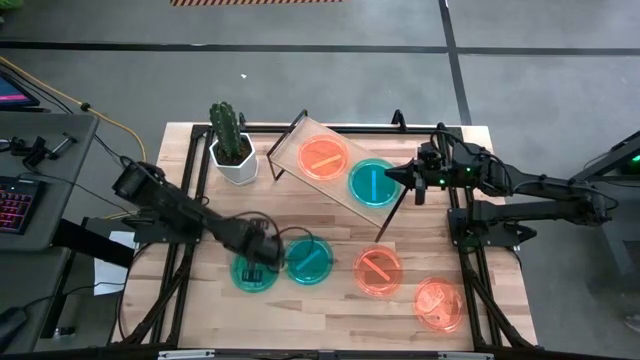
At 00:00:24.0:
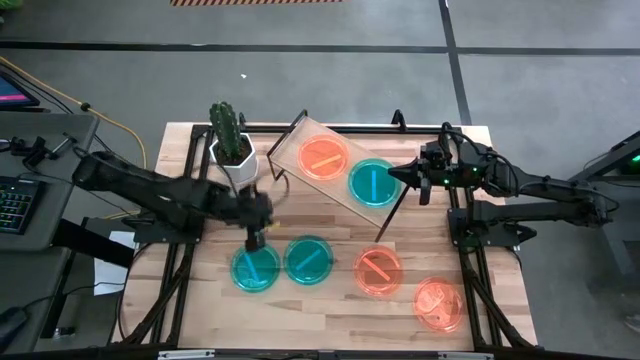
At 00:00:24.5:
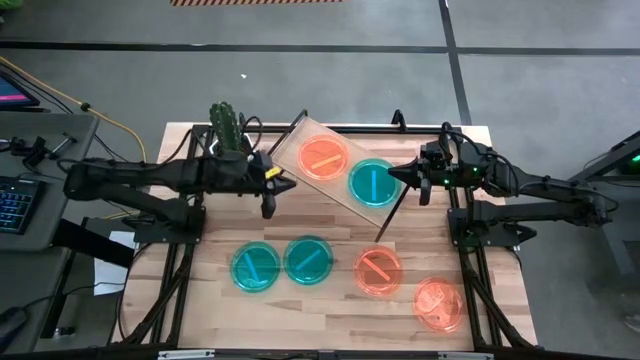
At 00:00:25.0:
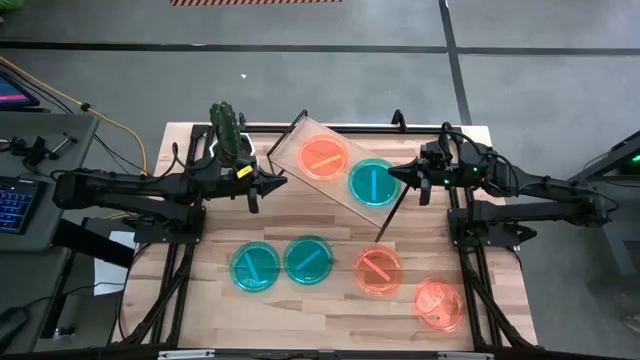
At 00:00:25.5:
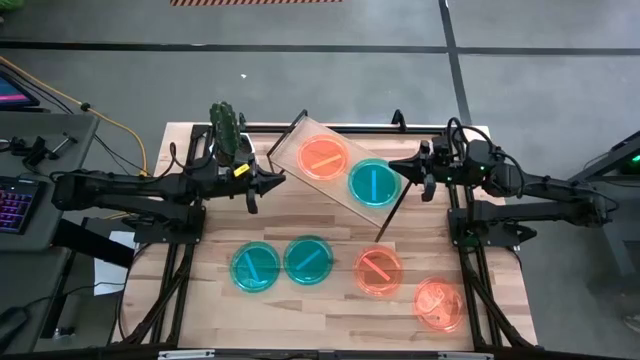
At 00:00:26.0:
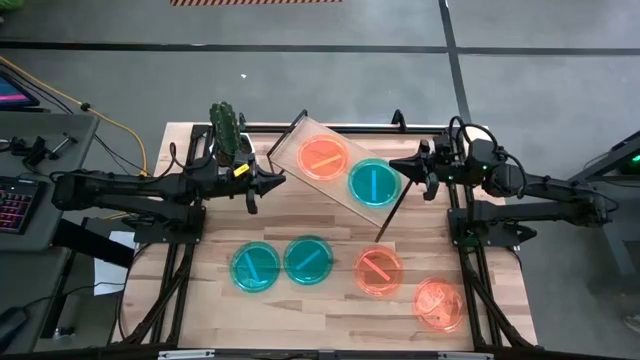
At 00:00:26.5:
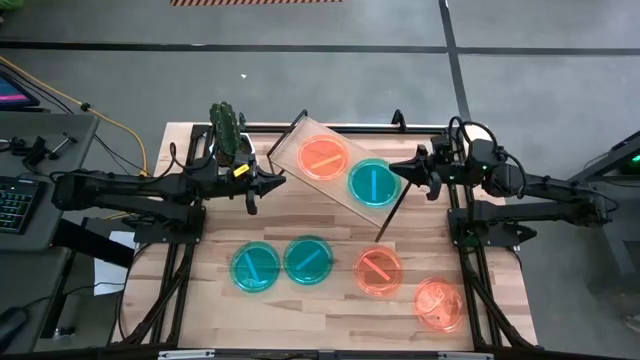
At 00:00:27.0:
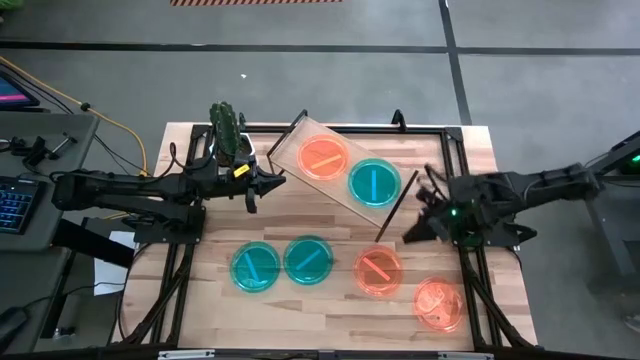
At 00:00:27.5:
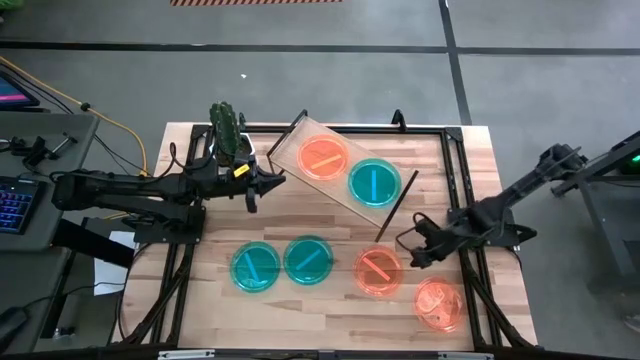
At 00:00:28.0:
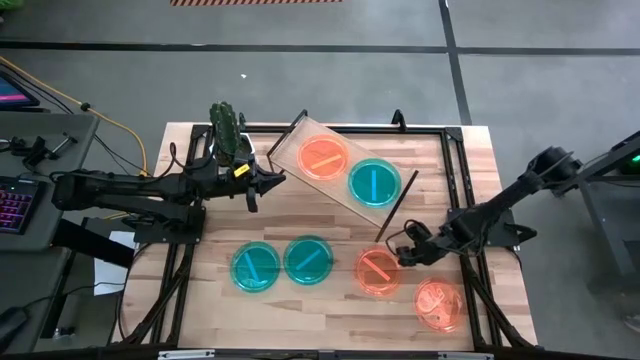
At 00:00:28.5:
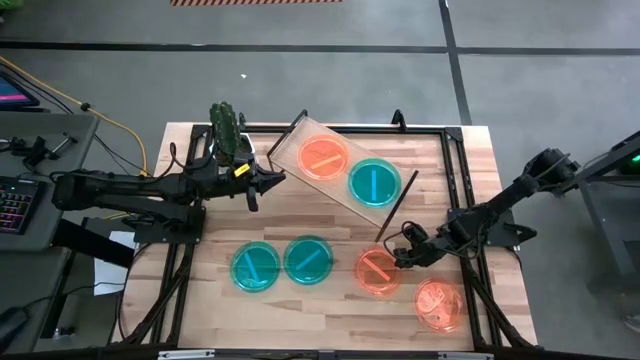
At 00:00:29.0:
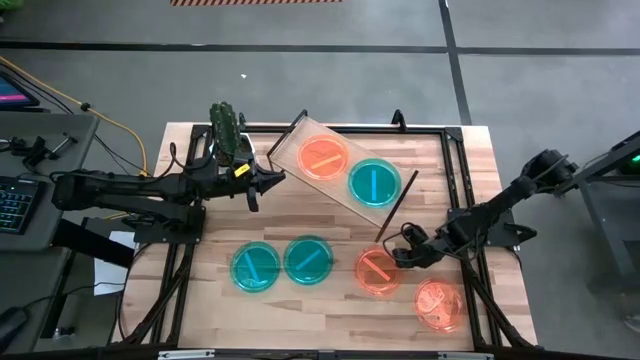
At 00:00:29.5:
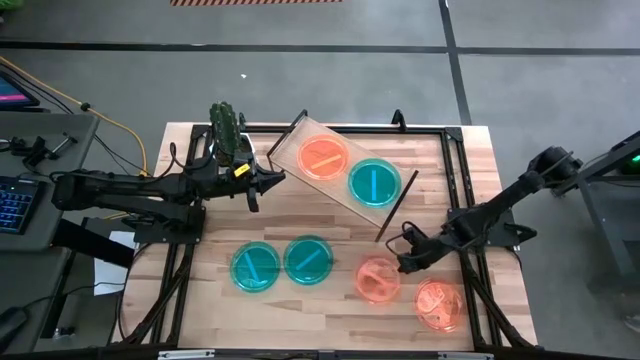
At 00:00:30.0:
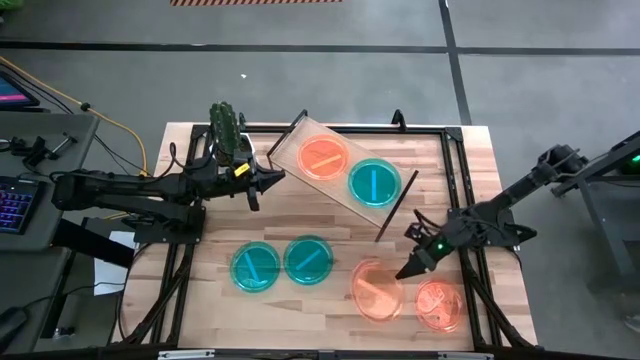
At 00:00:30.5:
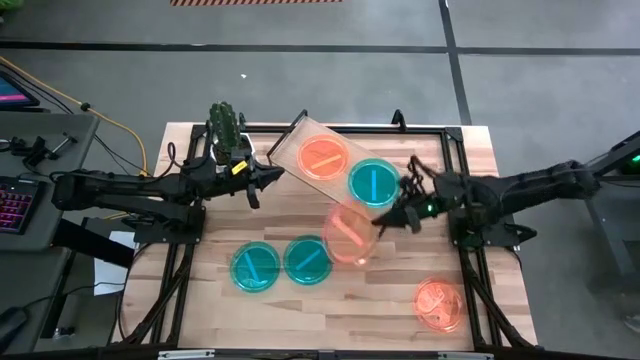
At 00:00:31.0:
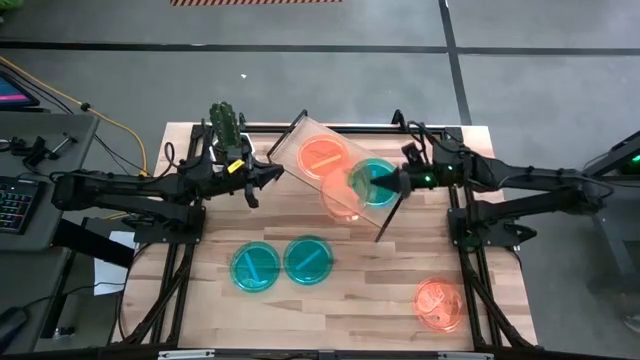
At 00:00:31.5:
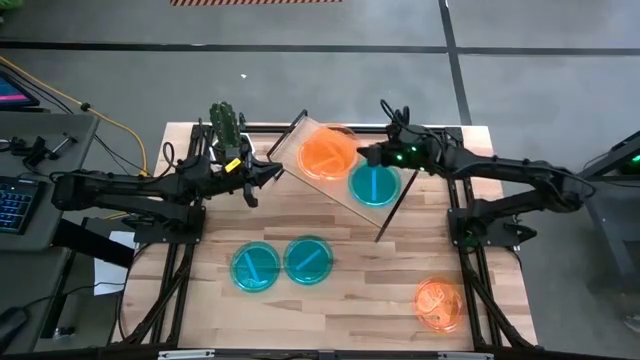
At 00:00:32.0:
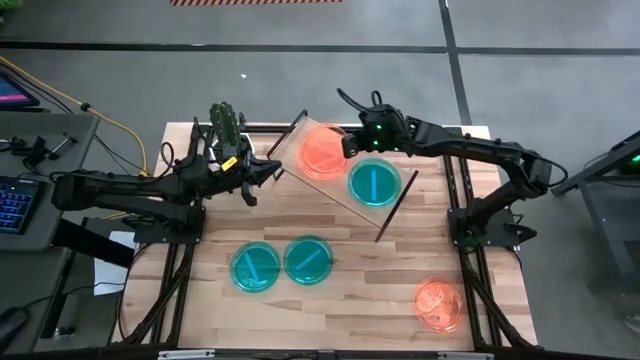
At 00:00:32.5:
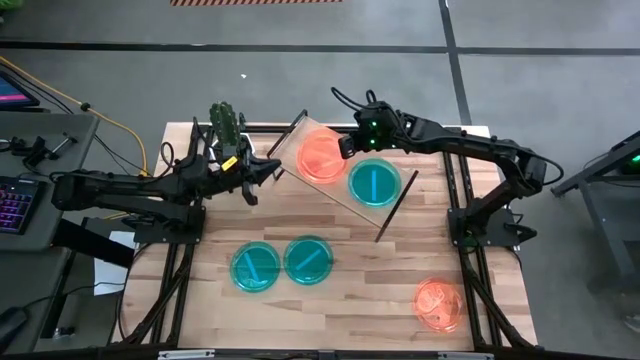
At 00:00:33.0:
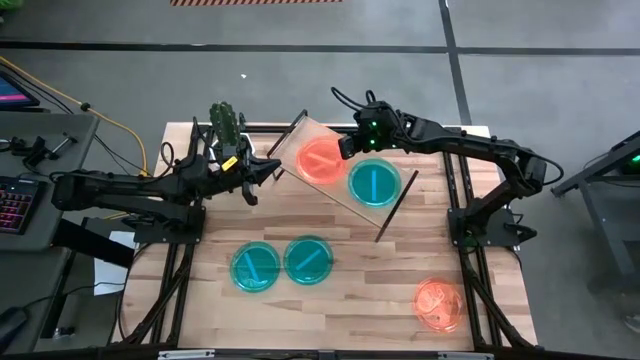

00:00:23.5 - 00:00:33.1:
Task: Place and stack plates onto a shelf
Stack the left orange plate on top of the orange plate on the shelf

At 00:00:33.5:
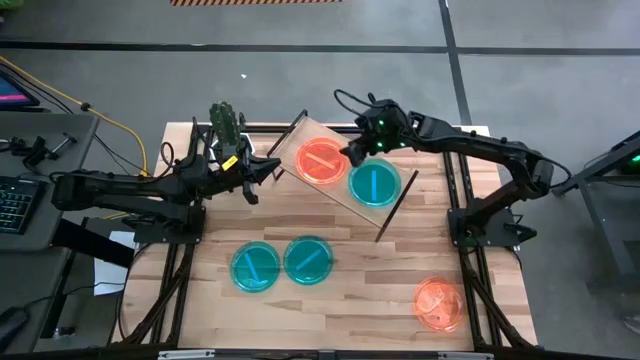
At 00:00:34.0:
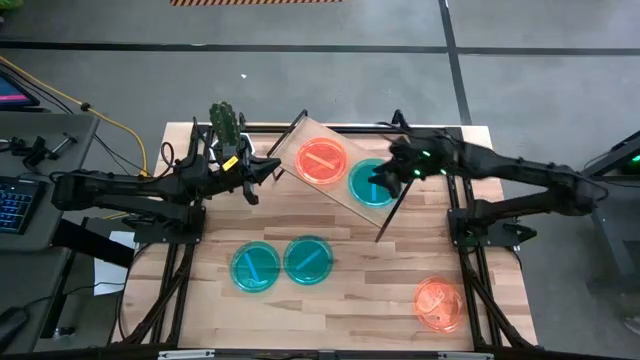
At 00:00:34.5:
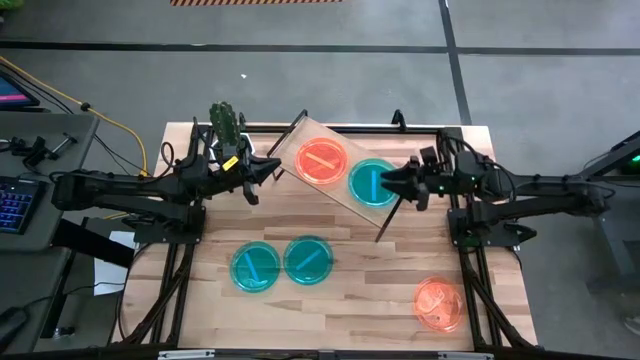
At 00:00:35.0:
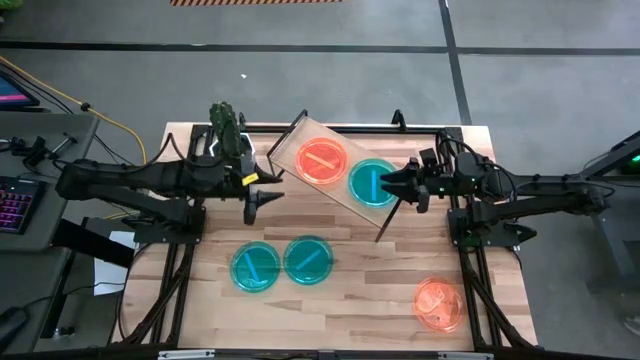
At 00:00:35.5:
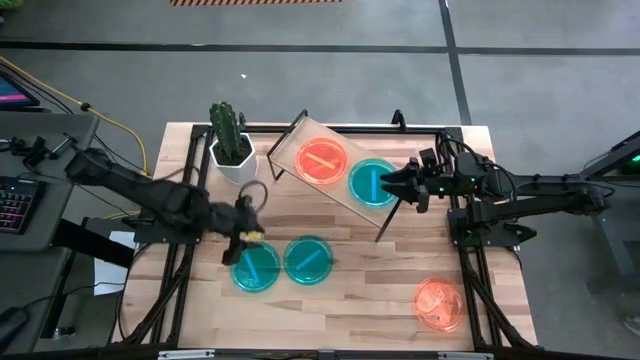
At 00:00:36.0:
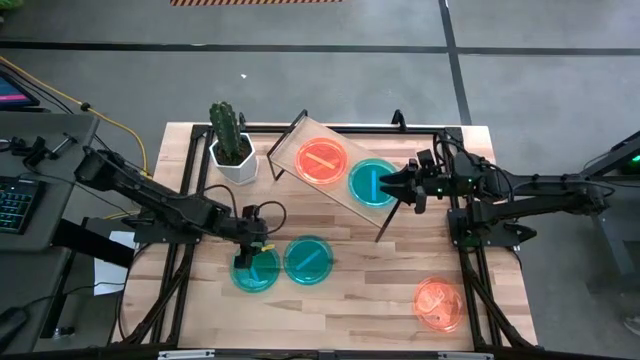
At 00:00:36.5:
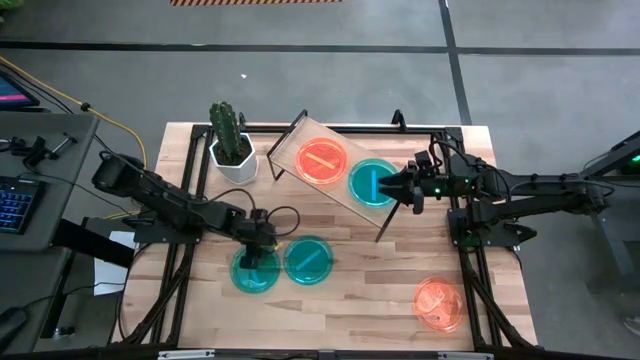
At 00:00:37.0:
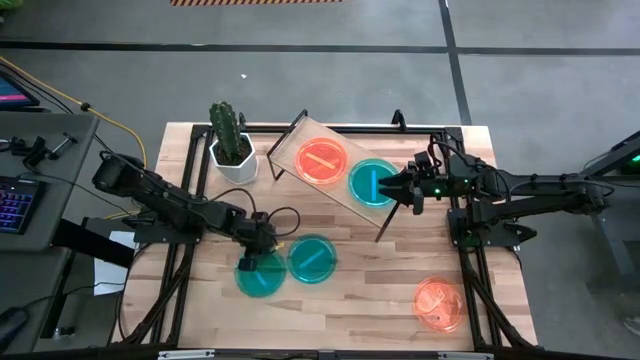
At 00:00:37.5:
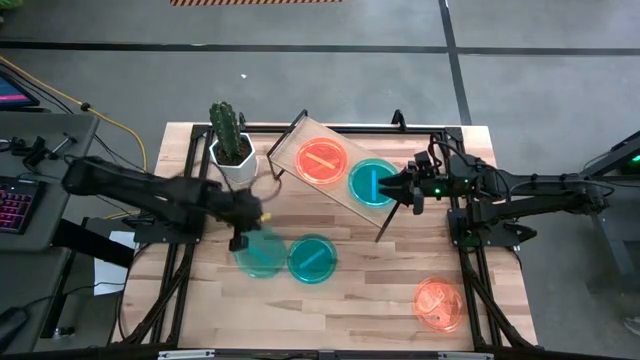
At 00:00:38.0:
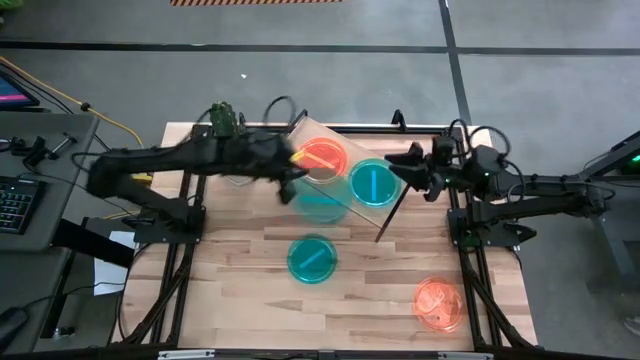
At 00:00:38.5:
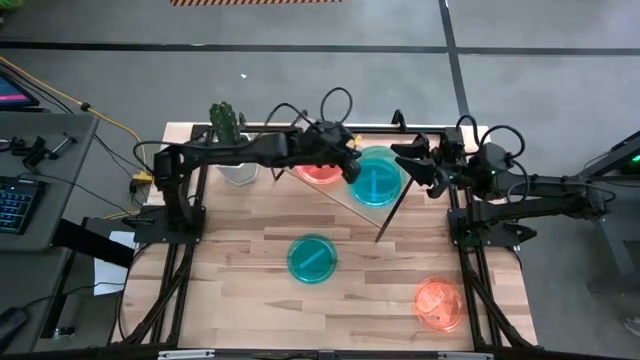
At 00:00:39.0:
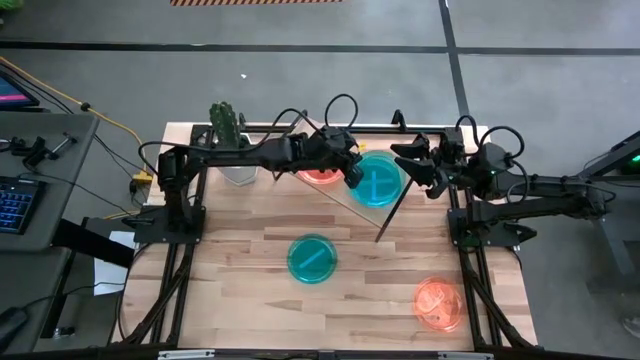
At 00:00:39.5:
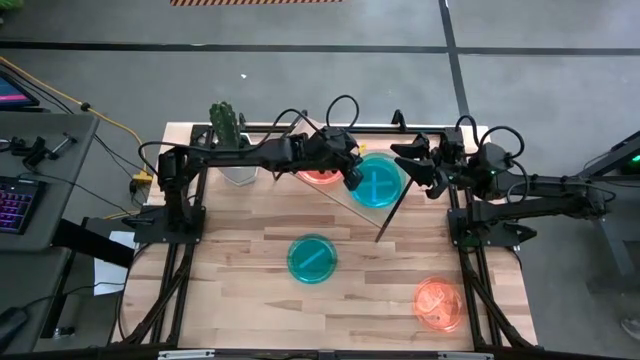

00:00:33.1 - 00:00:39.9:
Stack the left blue plate on top of the blue plate on the shelf

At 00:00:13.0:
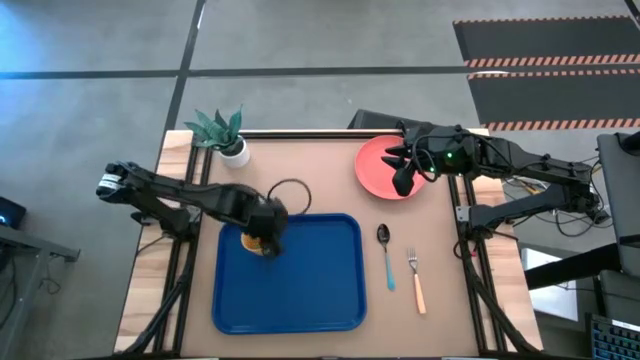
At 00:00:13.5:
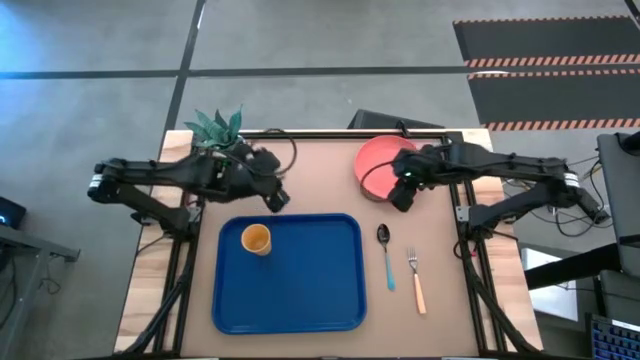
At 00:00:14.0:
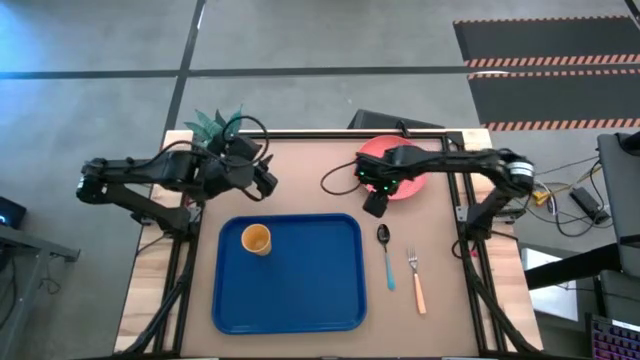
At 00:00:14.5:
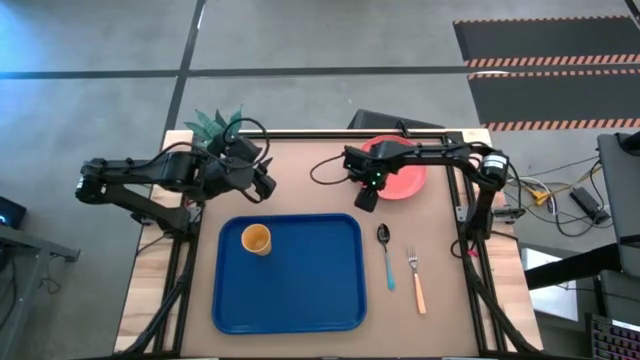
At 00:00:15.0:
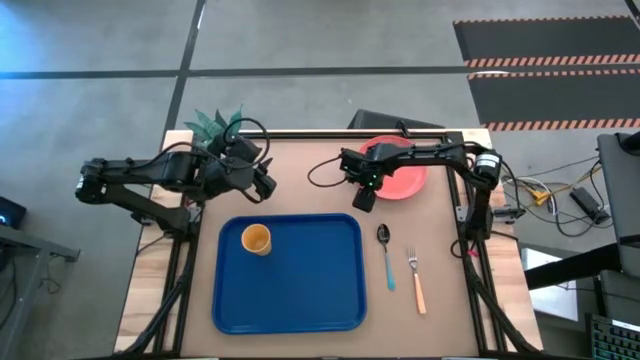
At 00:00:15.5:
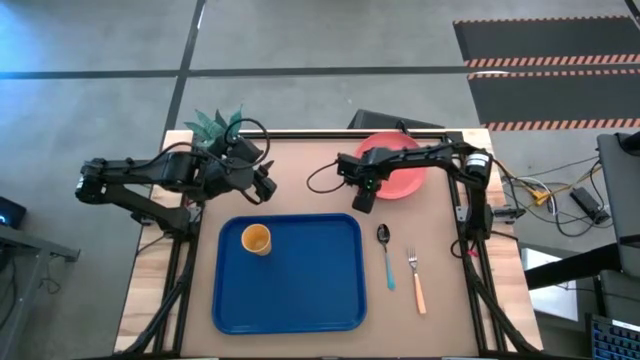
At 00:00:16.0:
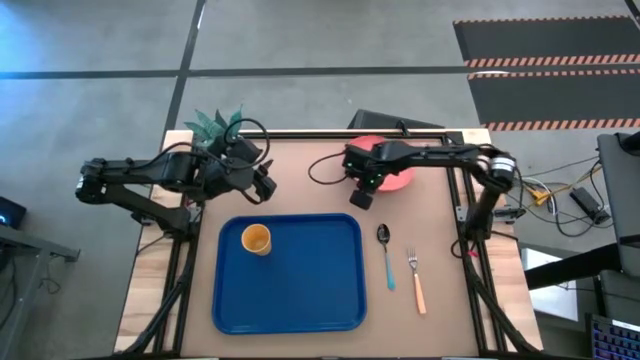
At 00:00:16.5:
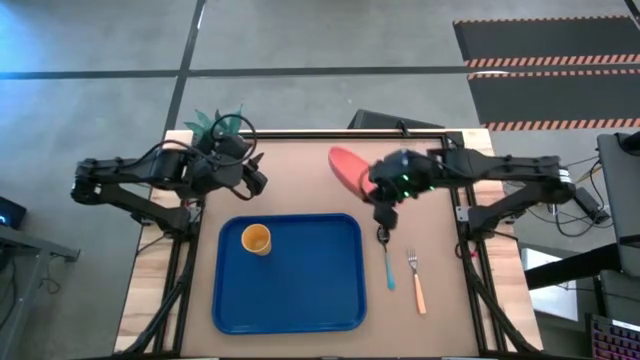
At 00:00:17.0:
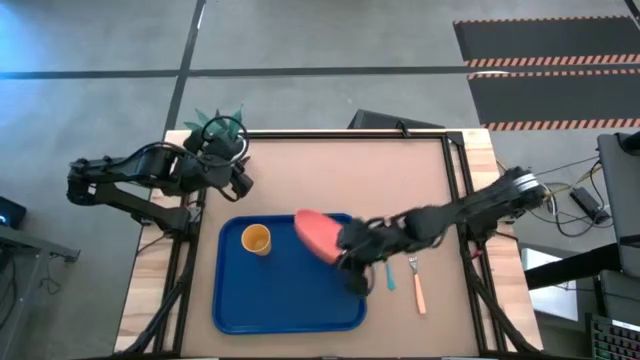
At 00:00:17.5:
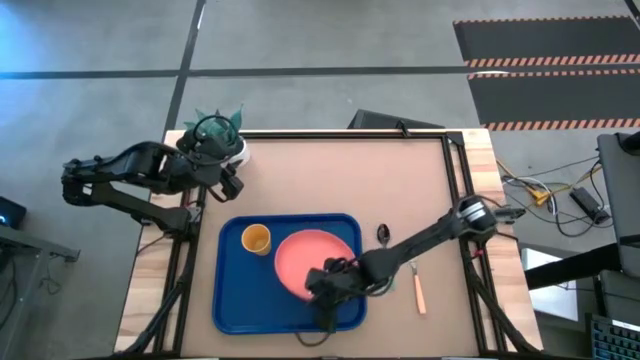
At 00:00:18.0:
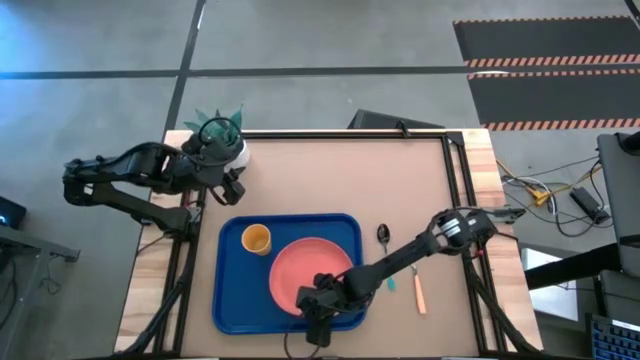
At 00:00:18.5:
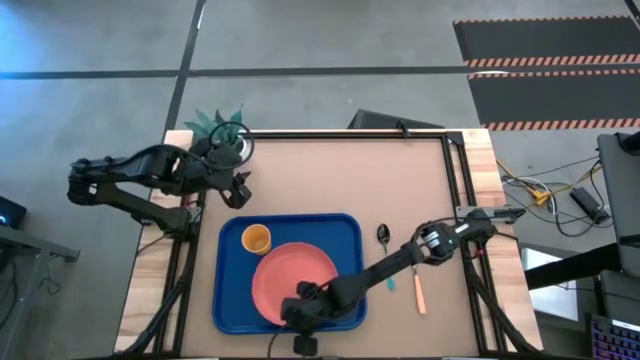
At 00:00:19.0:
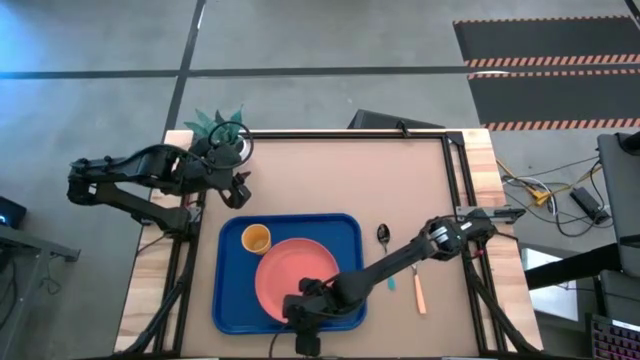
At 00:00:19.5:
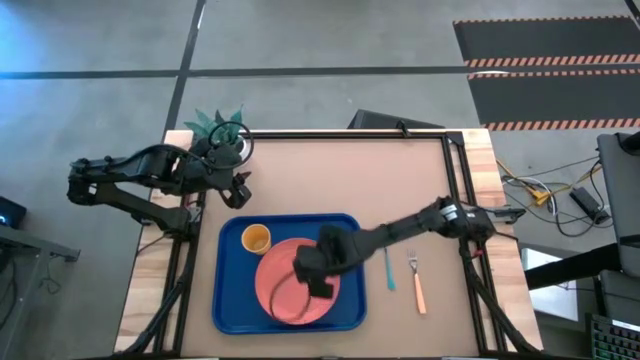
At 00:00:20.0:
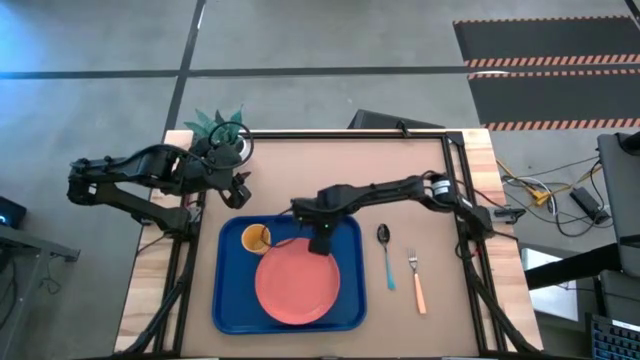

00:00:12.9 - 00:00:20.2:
Task: Pick and place plate/cup/fork/spoon on tray
Put the pink plate on the blue tray
